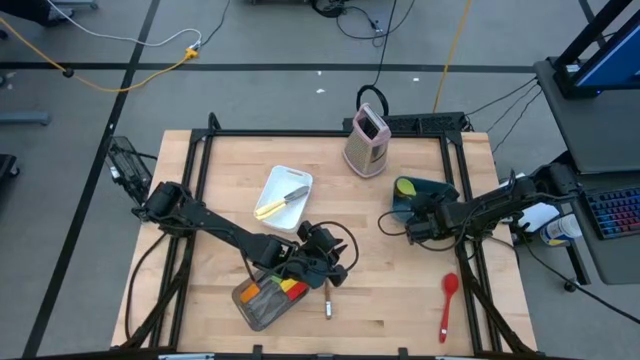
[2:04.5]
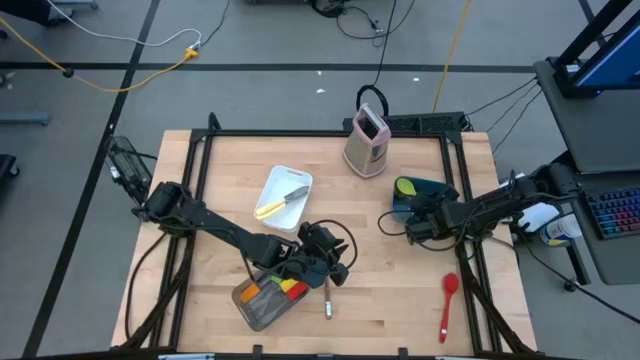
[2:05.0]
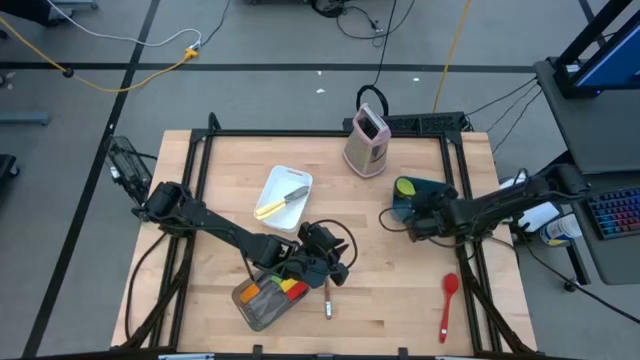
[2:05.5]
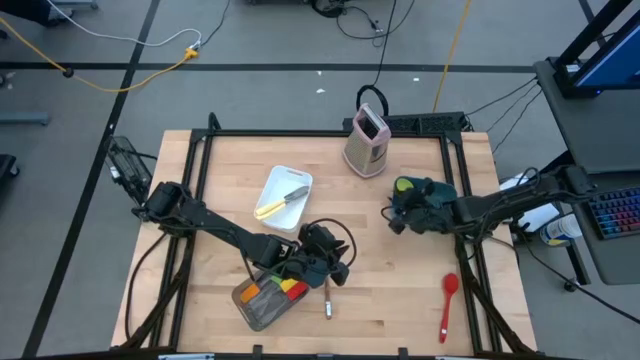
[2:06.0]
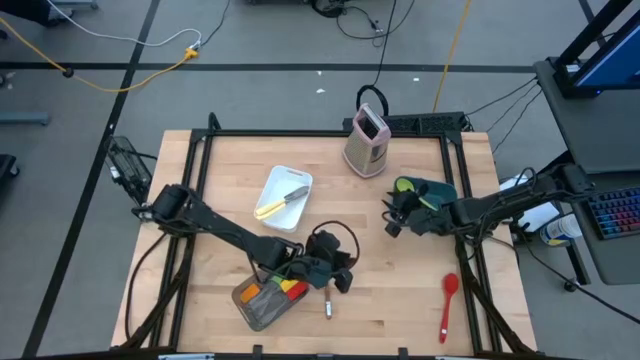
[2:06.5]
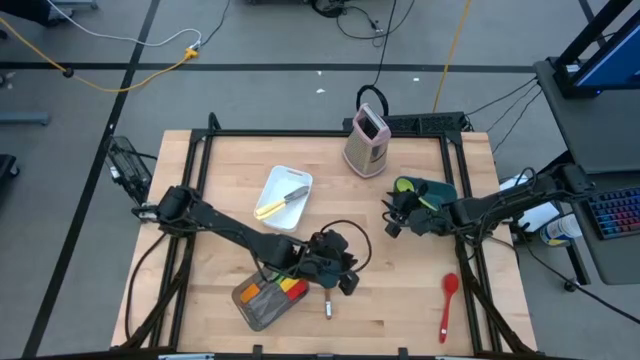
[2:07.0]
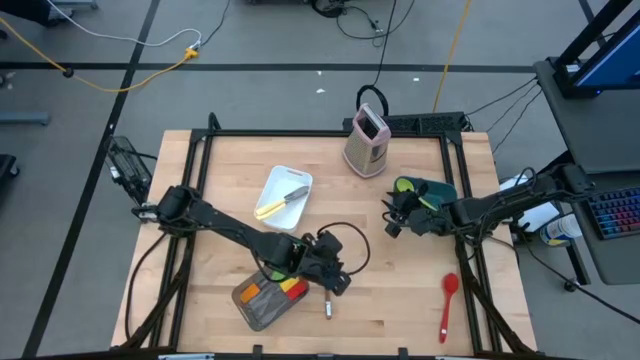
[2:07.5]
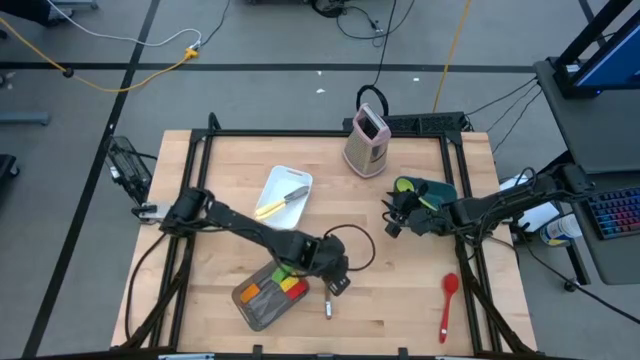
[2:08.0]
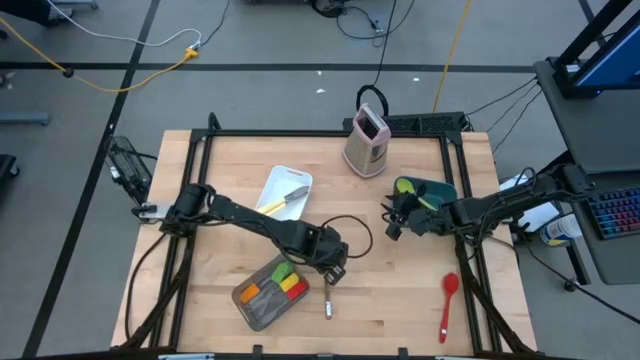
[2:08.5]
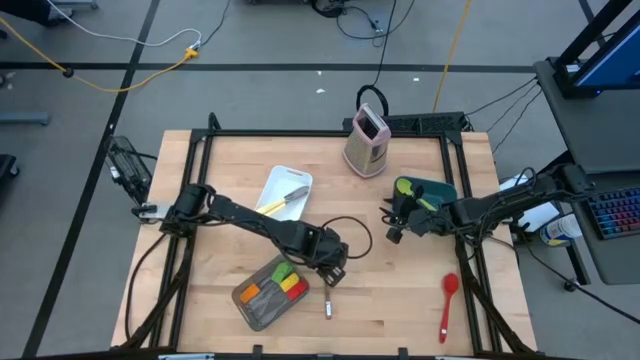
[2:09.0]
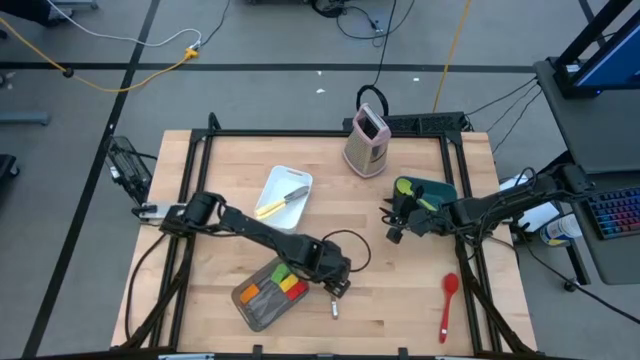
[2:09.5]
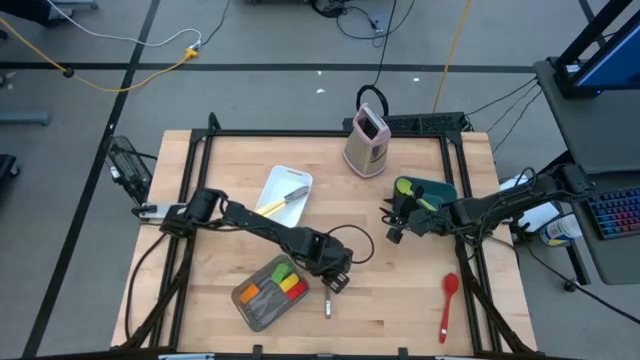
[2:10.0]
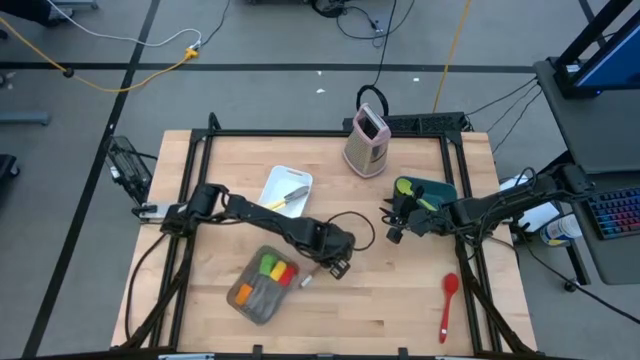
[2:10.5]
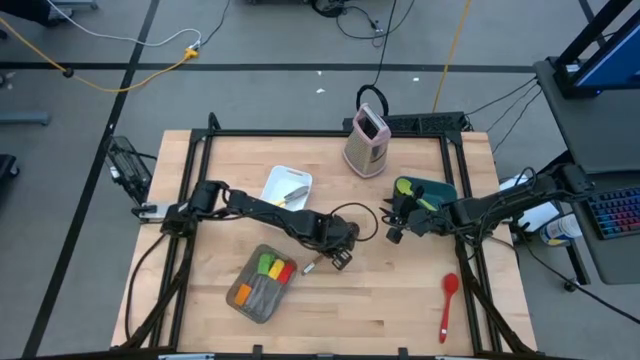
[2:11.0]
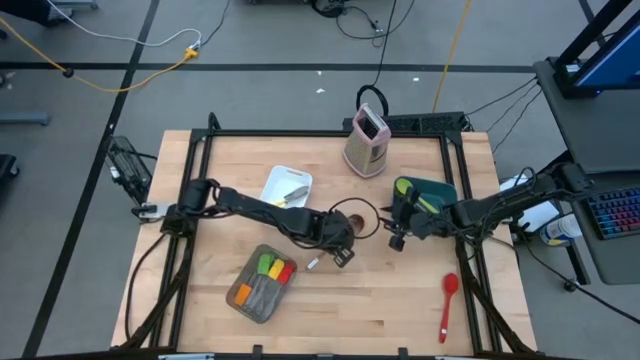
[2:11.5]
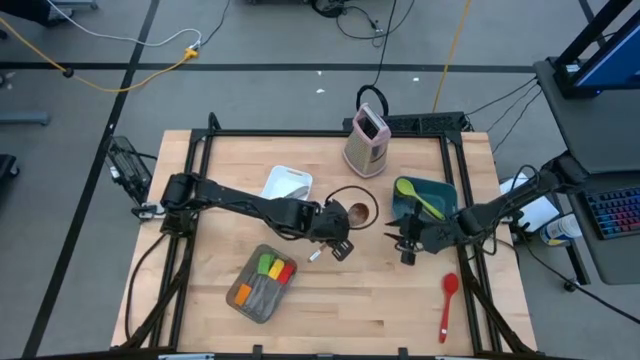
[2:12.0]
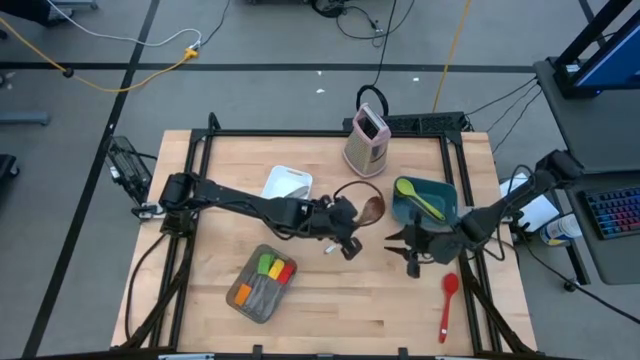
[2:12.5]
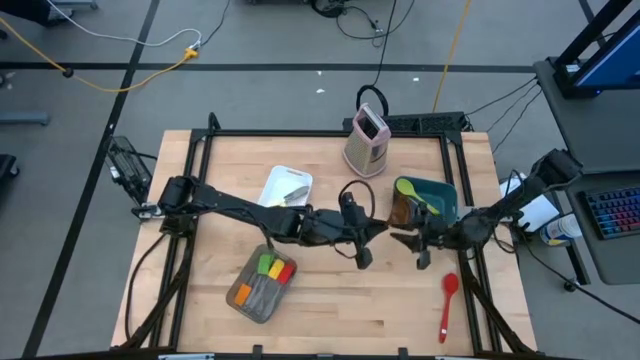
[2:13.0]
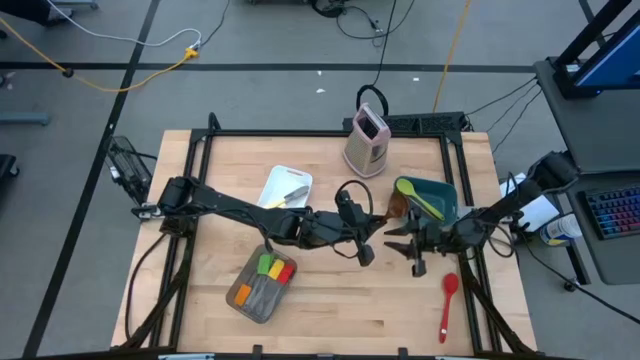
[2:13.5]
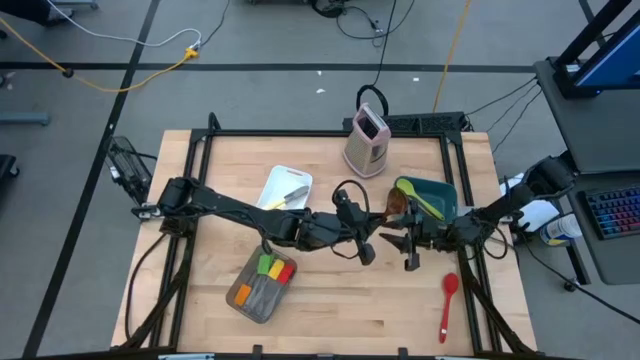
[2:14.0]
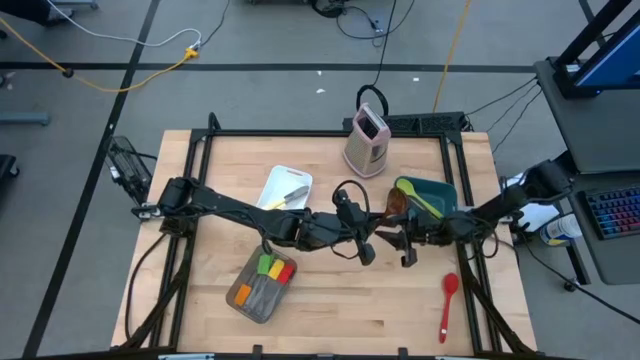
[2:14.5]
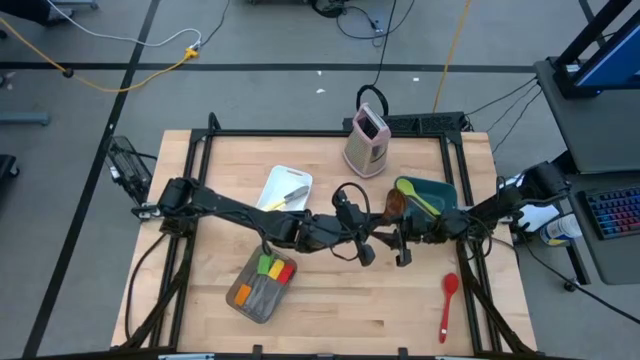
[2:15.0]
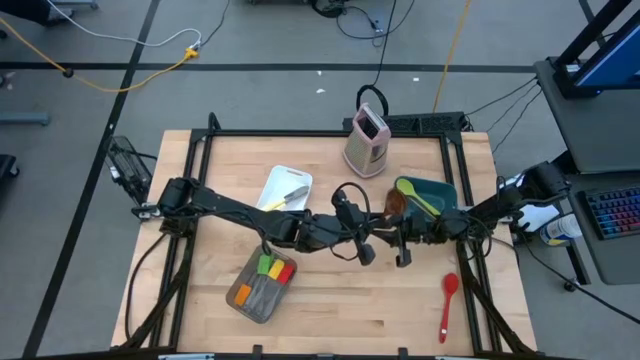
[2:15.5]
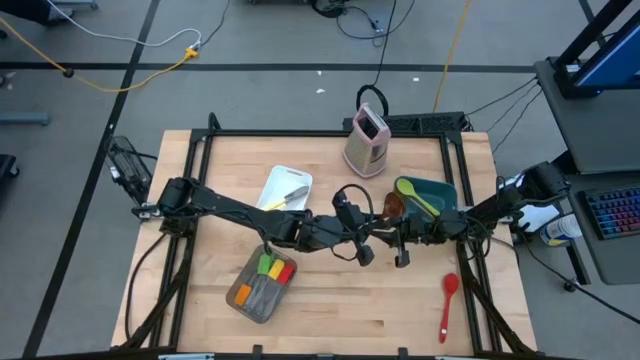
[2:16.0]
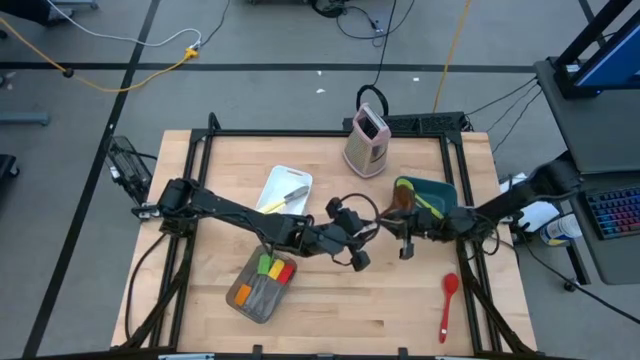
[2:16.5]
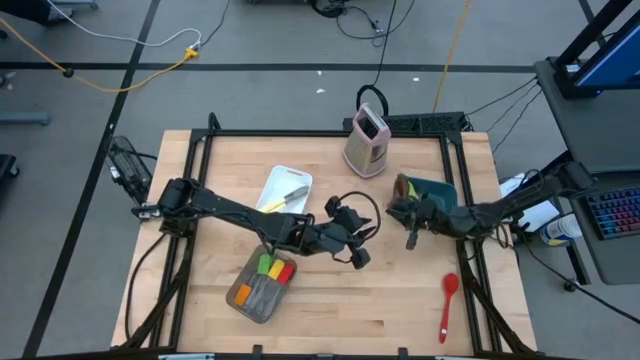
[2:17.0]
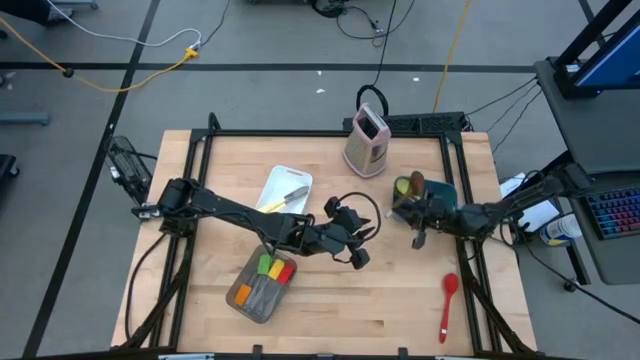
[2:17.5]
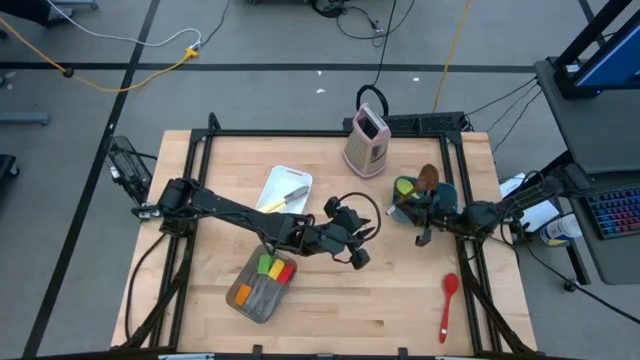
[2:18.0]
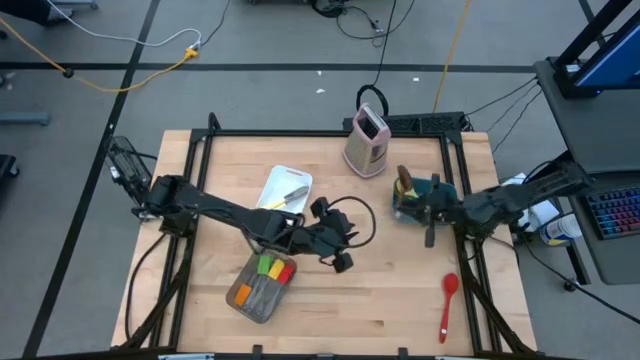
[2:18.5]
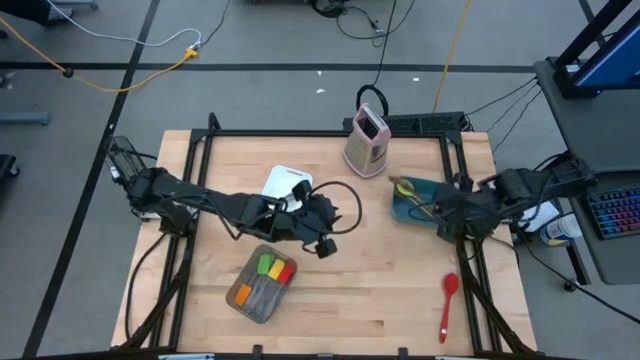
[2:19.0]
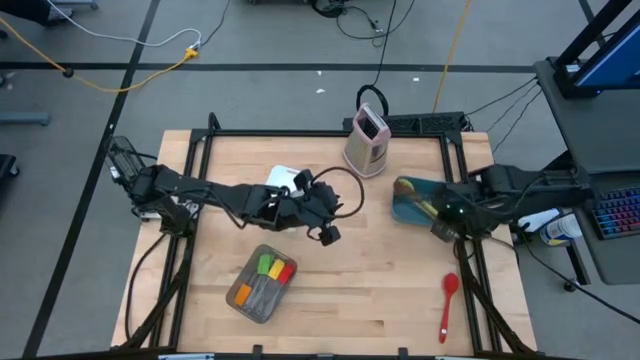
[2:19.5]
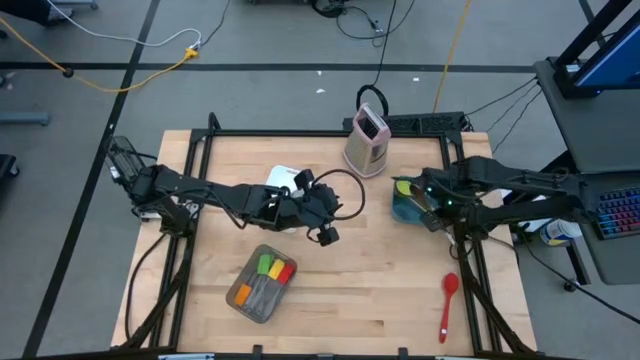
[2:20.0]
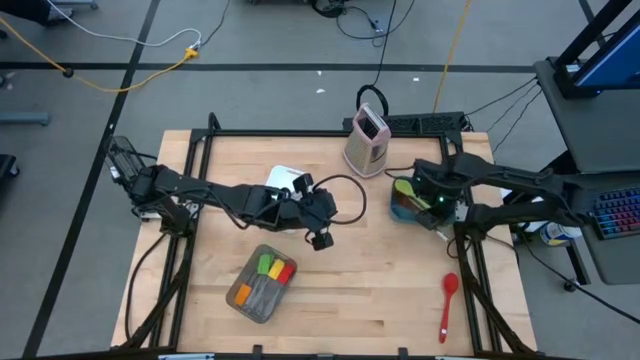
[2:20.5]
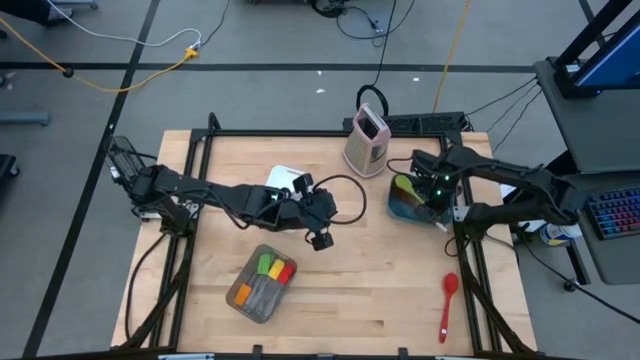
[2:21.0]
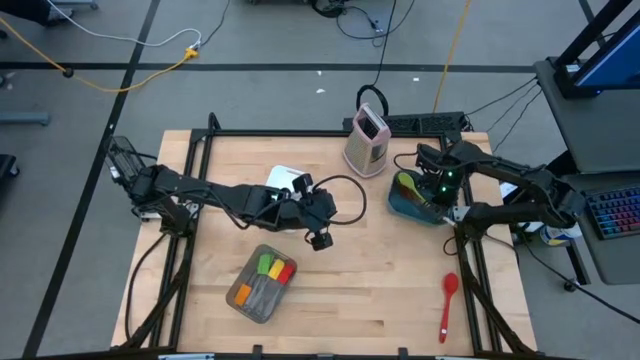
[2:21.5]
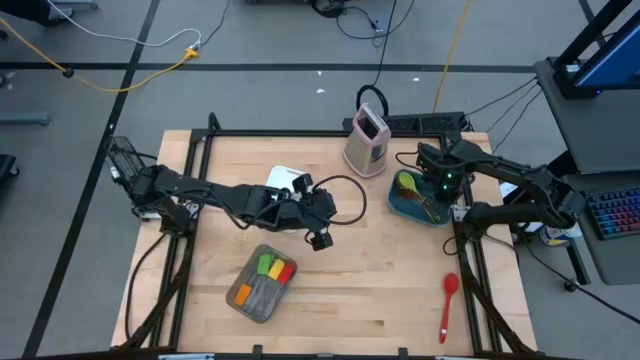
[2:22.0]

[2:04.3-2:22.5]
Task: Pick & Place Kitchen Items
Put the brown spoon into the blue bin

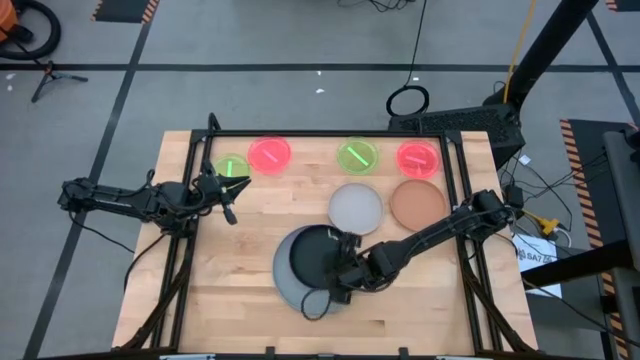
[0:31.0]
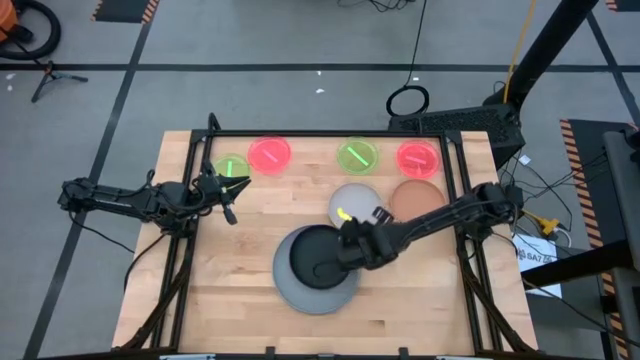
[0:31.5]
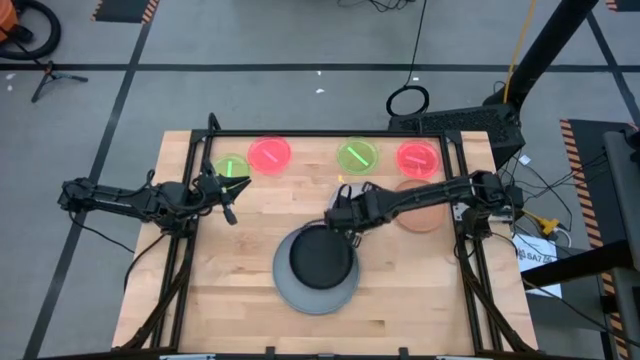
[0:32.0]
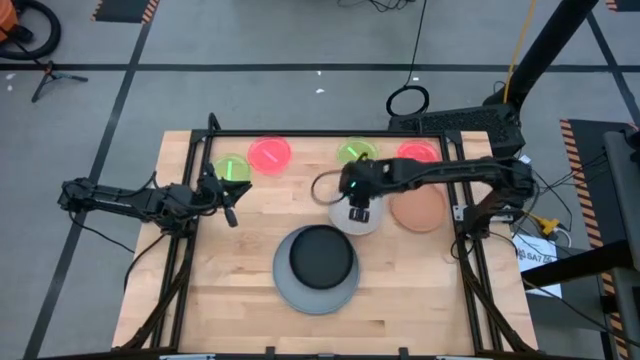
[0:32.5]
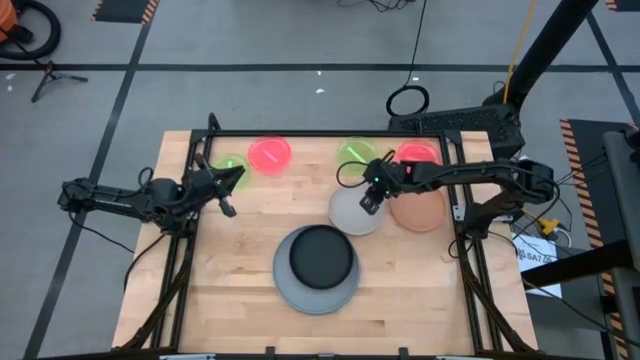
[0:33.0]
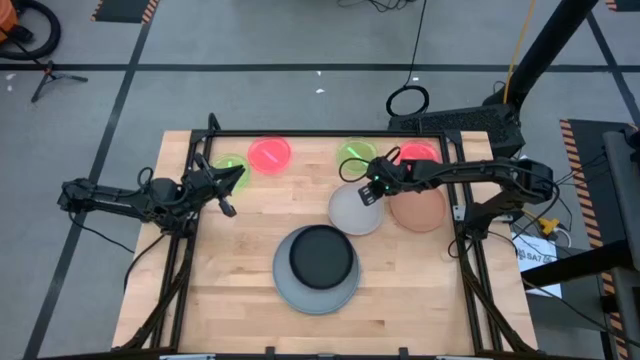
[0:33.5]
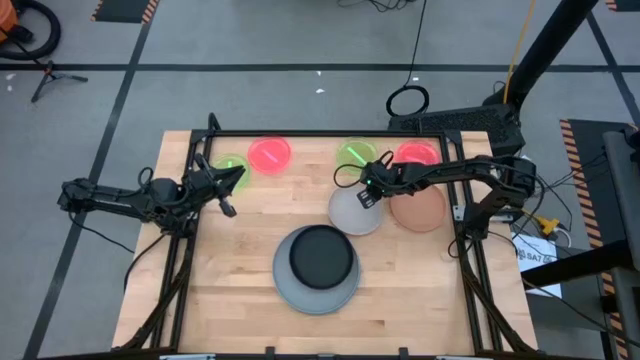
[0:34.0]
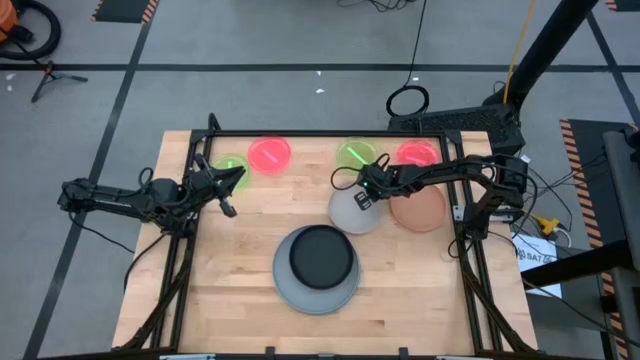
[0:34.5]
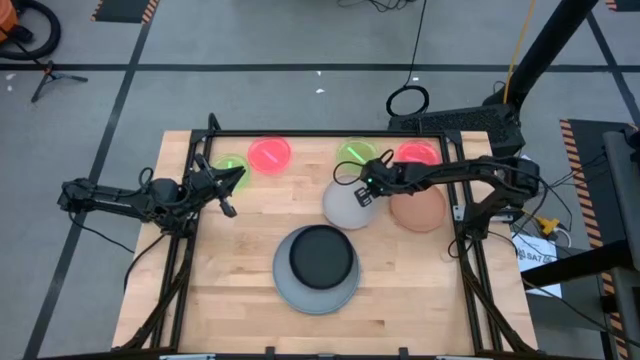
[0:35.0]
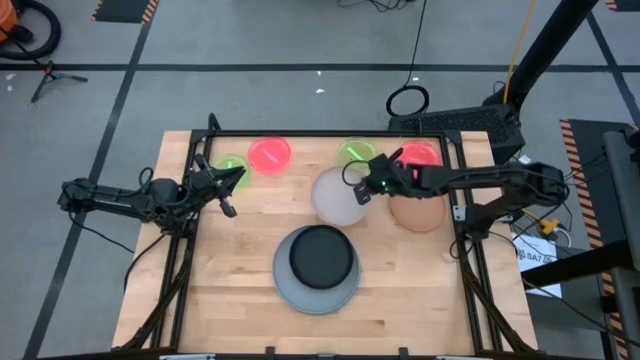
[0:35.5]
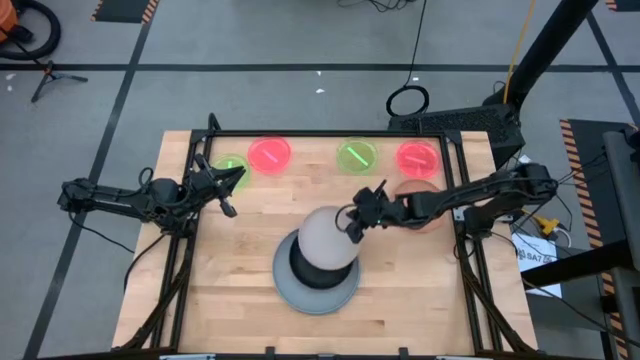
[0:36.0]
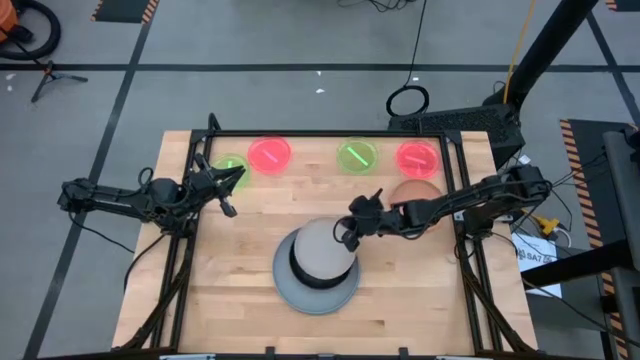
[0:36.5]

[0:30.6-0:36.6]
Task: Stack plastic plates
Stack the white plate on top of the black plate
